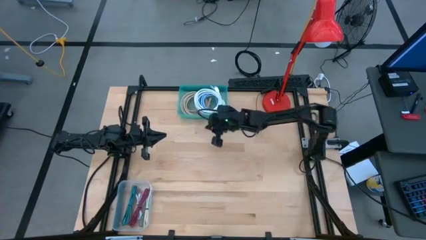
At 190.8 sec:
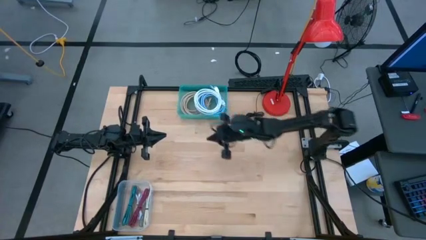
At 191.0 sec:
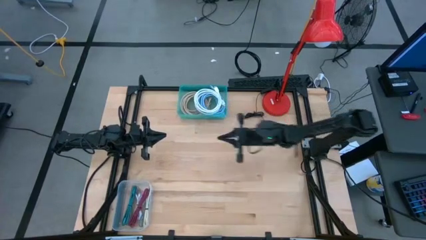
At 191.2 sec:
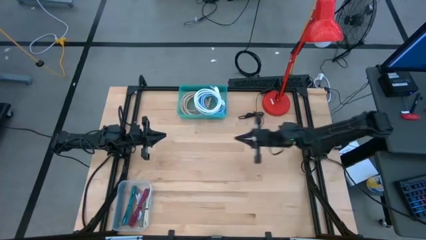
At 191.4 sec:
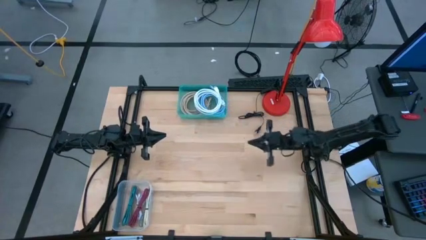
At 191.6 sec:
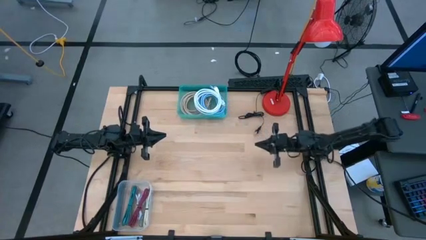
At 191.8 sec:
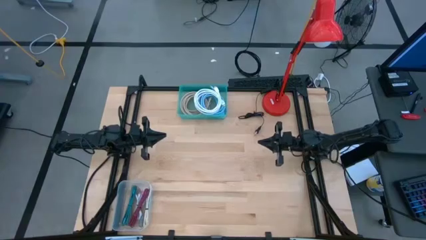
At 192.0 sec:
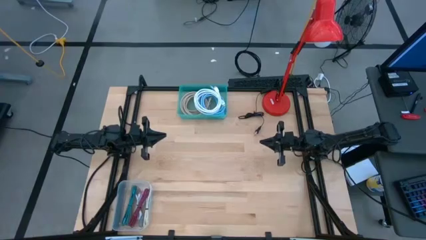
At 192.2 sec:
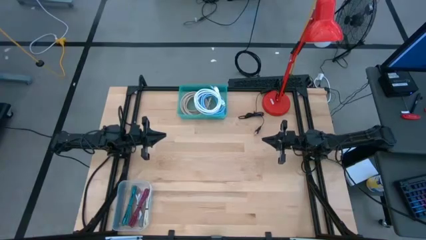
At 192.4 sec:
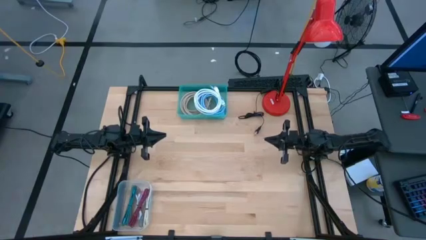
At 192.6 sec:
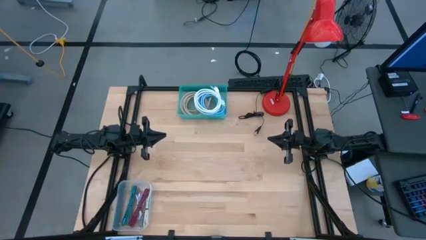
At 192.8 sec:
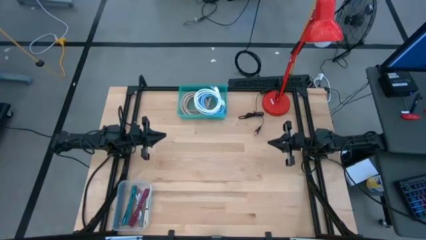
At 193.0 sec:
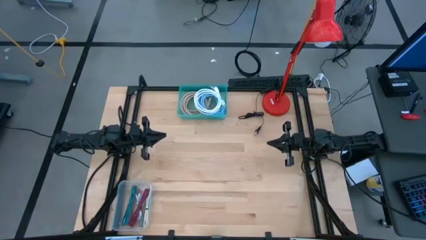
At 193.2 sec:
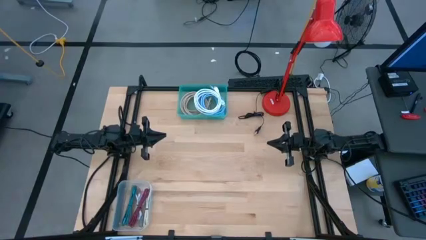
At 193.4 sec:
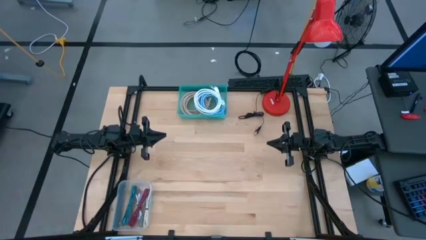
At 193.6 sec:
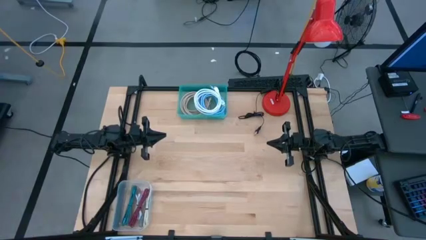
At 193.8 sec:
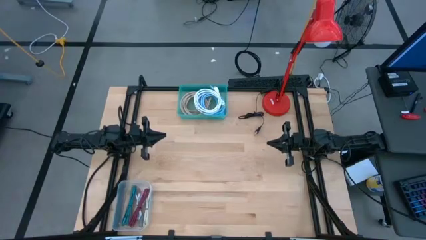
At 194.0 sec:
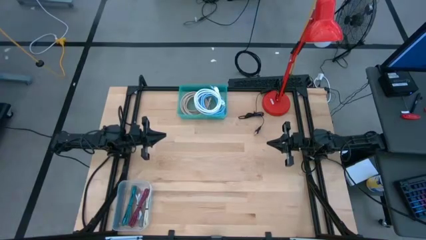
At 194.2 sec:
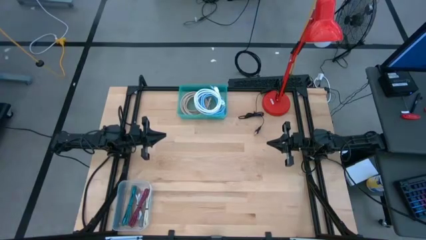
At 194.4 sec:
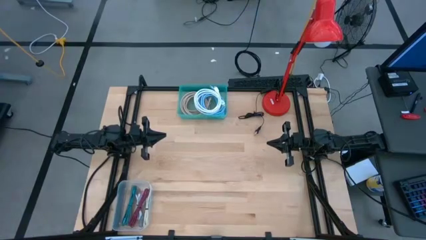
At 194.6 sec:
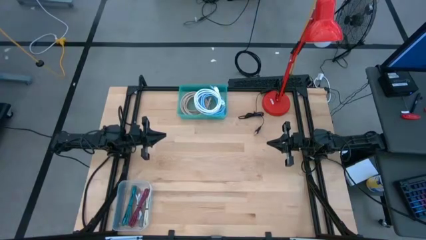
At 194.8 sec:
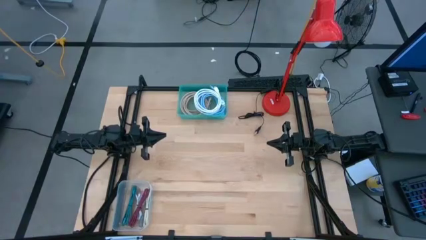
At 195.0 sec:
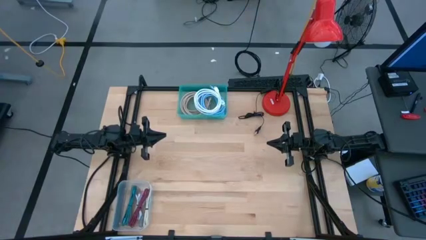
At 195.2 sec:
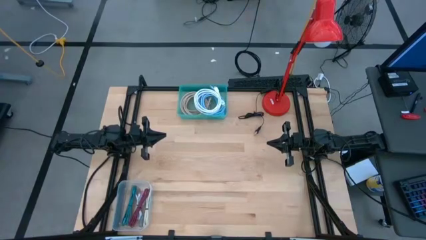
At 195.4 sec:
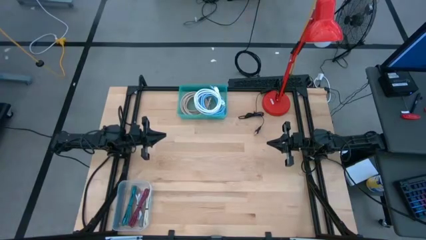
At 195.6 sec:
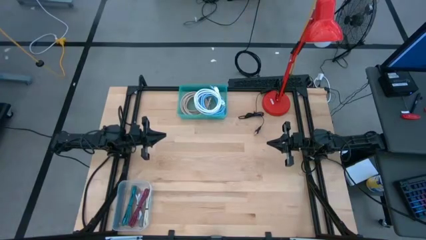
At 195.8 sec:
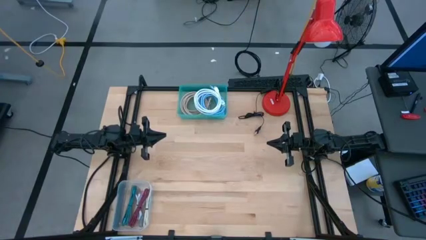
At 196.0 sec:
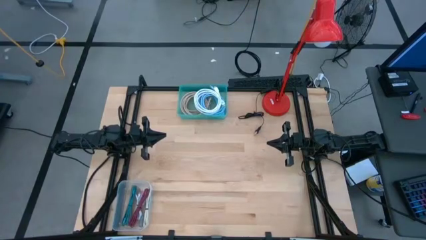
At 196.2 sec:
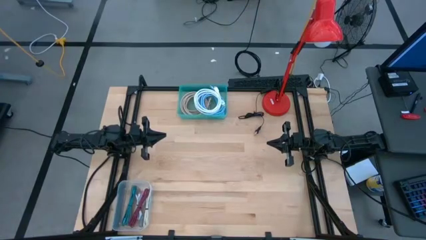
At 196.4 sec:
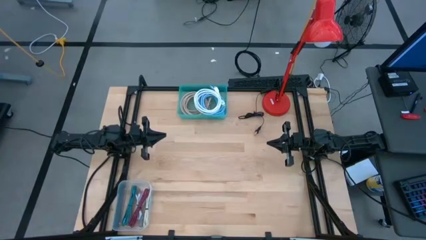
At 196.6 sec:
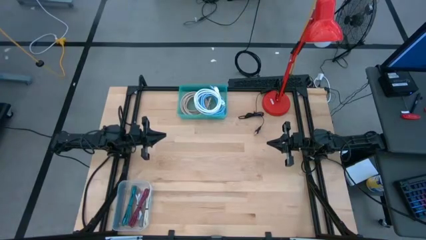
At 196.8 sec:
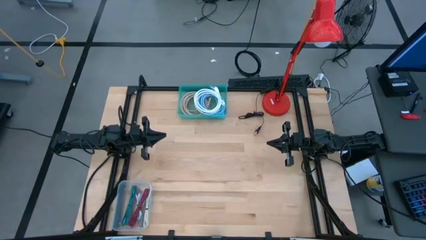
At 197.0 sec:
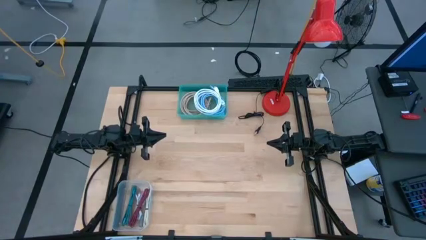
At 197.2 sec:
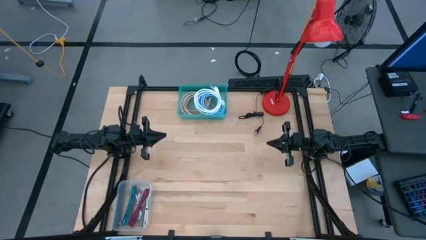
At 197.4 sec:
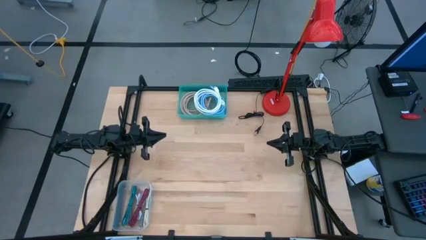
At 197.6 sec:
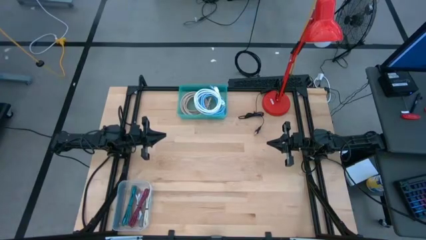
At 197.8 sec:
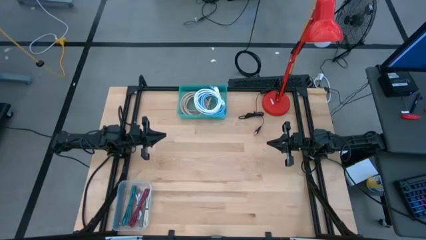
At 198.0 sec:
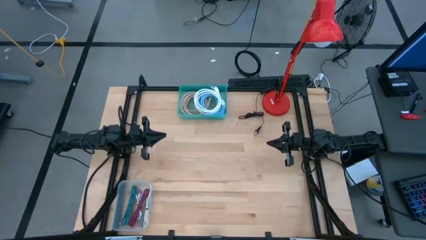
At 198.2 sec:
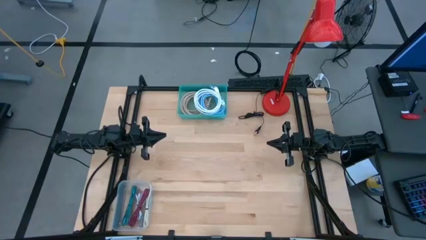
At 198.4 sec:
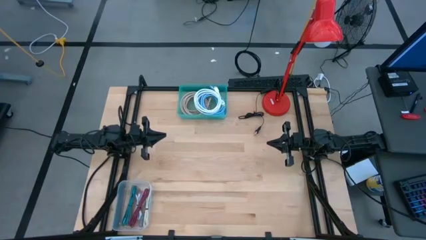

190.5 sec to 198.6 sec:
Task: Pick & Place USB Port
Return to Home Position

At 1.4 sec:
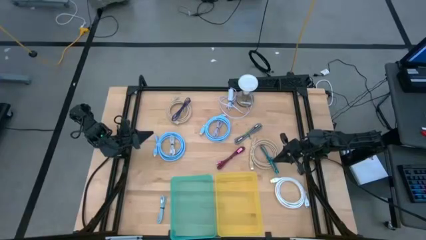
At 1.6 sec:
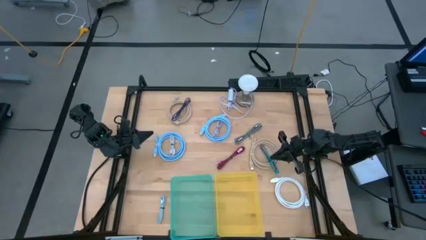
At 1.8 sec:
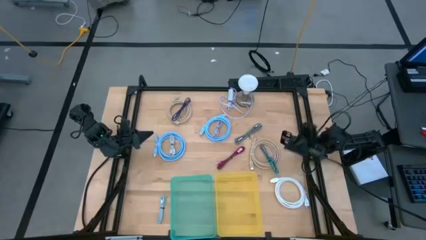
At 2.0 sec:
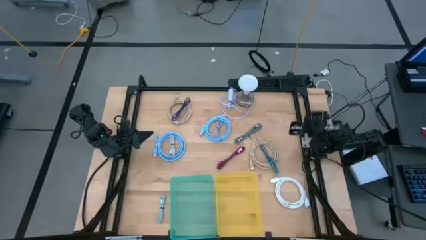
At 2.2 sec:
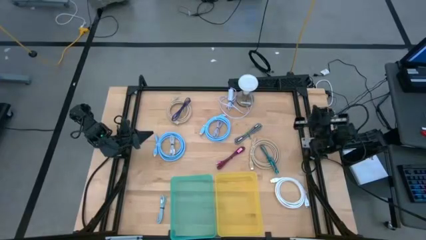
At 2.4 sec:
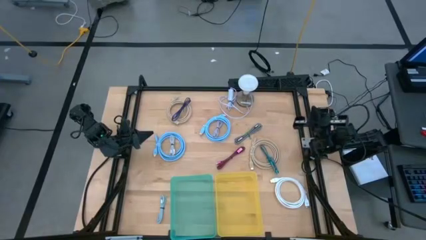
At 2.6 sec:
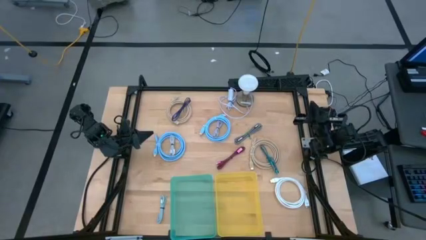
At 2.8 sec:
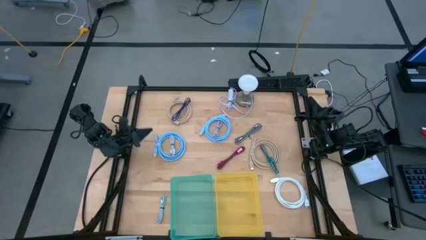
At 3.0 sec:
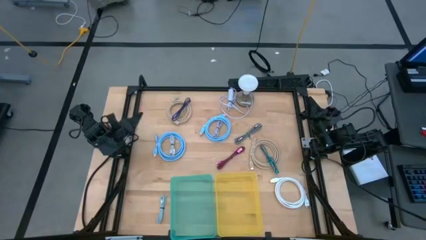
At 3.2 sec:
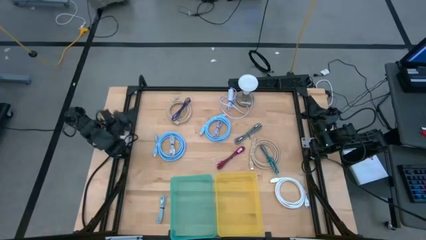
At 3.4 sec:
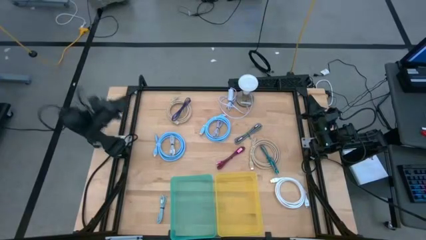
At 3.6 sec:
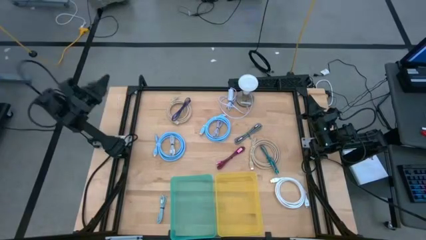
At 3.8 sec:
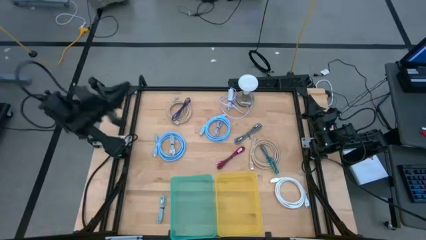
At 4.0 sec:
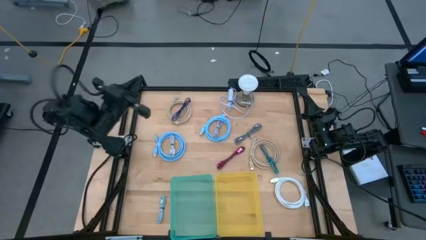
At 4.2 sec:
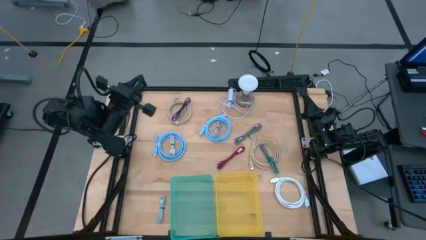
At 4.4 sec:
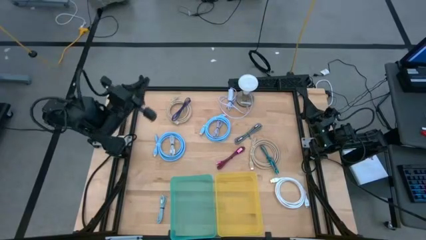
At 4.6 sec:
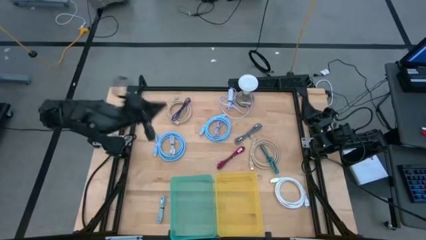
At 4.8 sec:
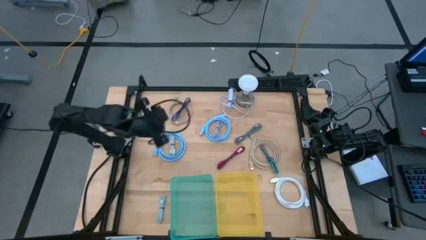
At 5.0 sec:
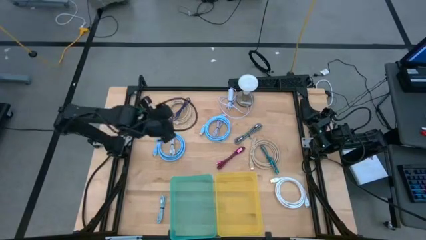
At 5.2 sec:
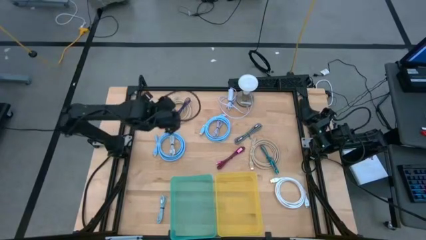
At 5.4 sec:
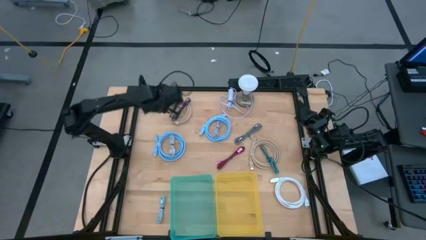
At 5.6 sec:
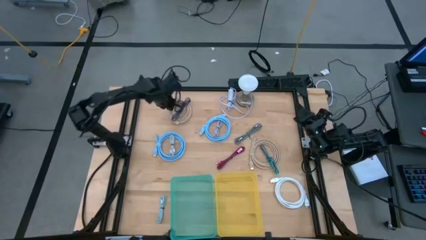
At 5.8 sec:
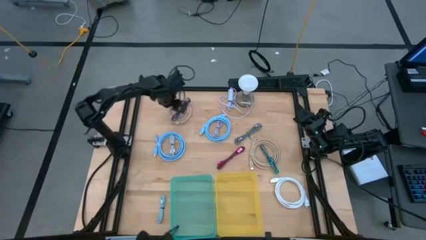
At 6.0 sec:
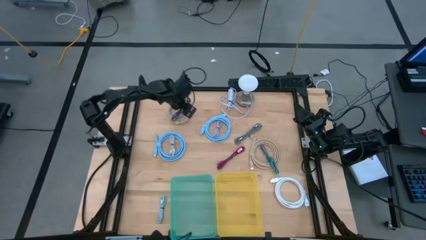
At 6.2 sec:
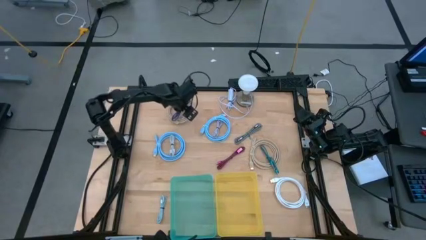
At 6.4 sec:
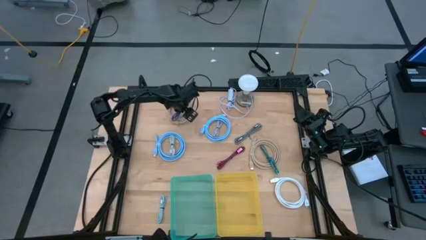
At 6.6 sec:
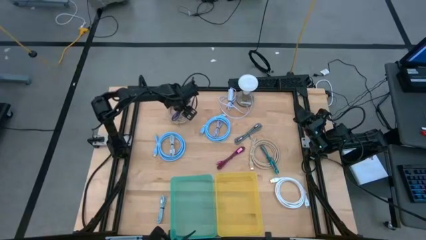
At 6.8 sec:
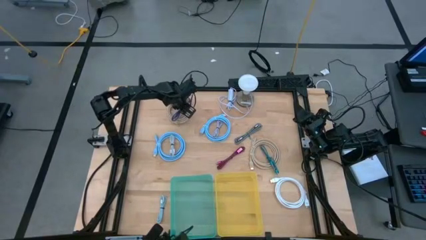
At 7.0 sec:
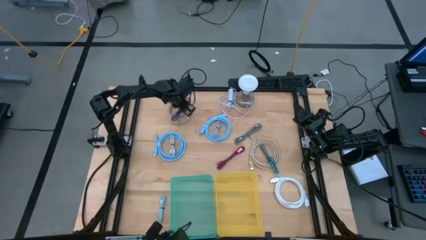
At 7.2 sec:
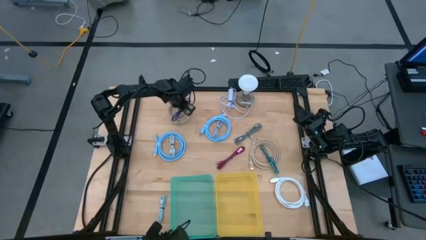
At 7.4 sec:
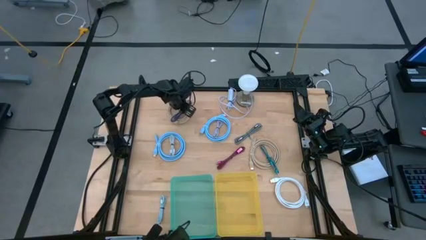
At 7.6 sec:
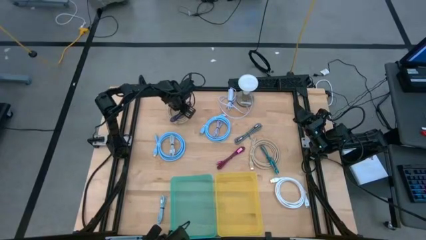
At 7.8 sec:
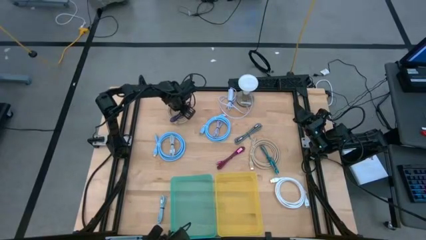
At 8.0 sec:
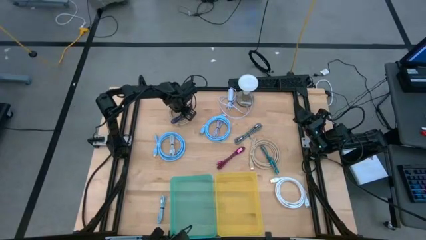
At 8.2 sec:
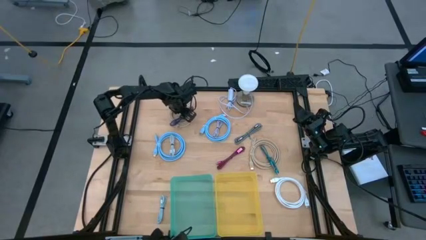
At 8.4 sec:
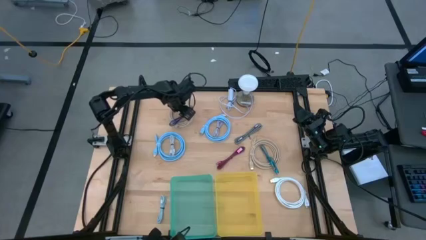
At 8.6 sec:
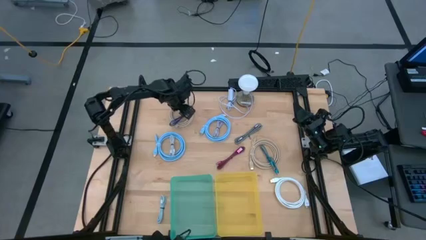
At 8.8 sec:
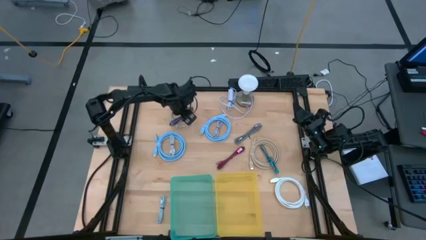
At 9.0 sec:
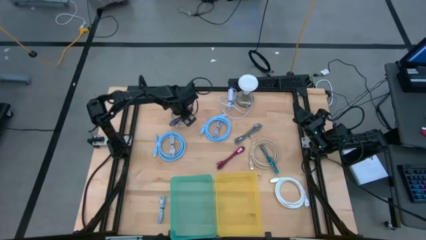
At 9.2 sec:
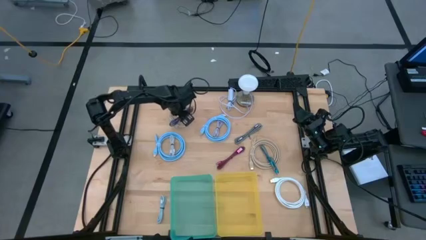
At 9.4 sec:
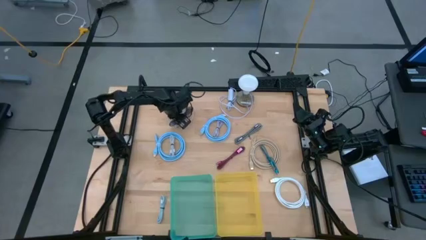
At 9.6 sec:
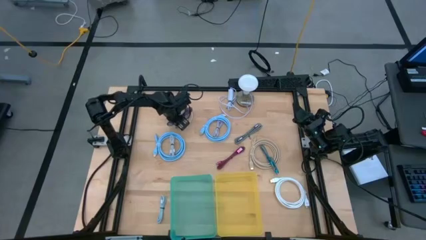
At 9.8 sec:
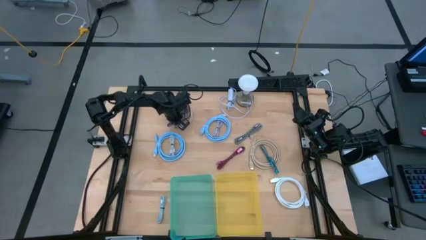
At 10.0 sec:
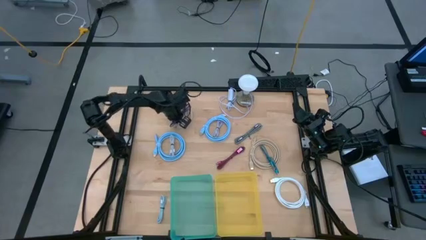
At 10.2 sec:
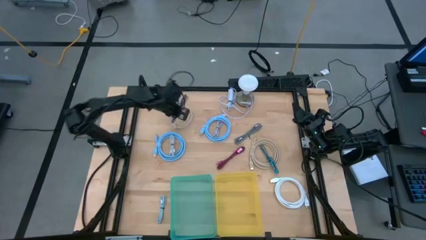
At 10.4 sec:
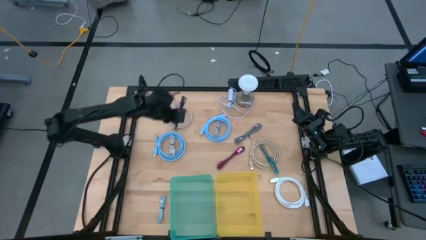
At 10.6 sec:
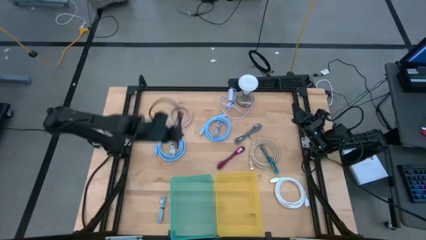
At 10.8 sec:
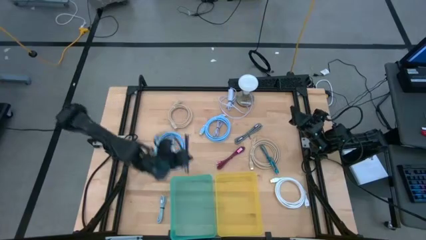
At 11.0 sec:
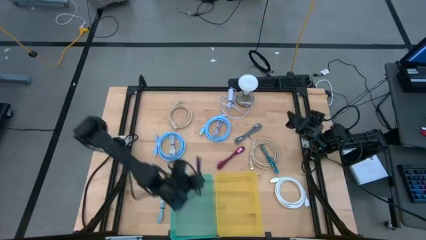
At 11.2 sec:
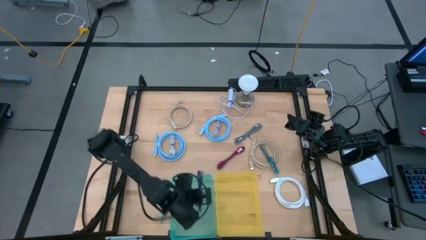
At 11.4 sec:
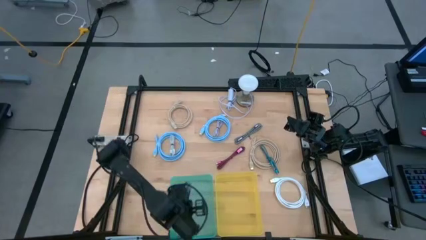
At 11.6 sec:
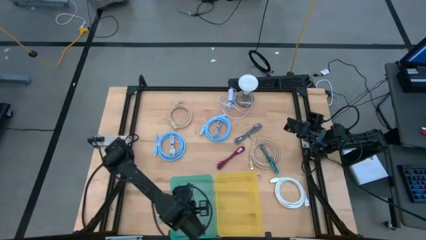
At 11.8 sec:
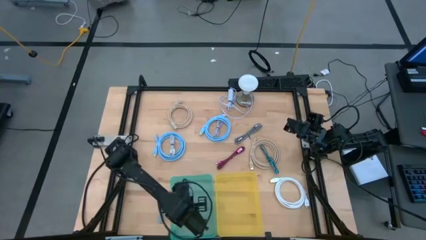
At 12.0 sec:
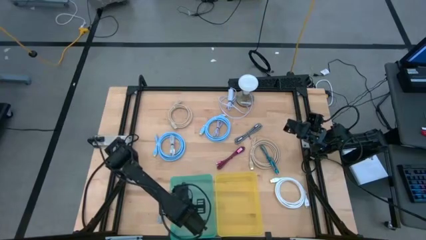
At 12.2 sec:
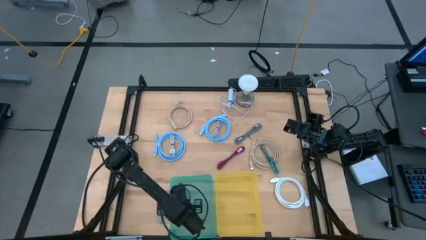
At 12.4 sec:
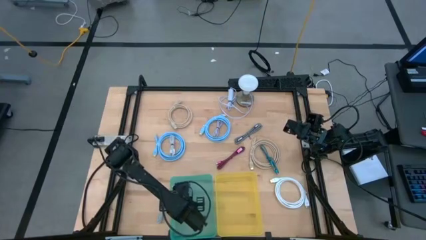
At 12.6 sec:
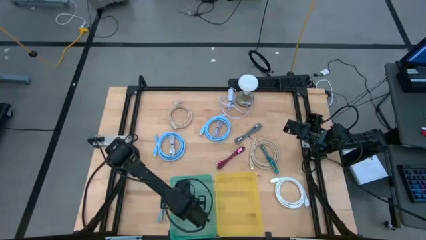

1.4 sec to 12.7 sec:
Task: Pick & Place USB Port
Put the dark violet charger cable into the green bin
